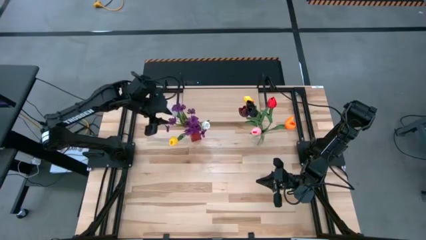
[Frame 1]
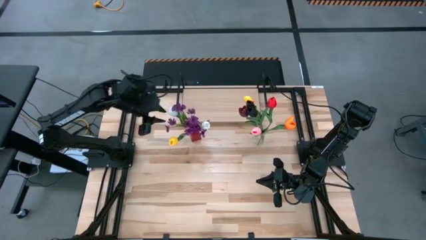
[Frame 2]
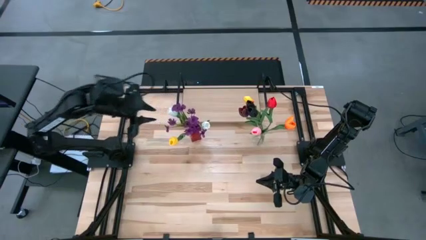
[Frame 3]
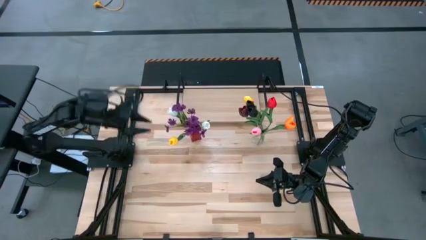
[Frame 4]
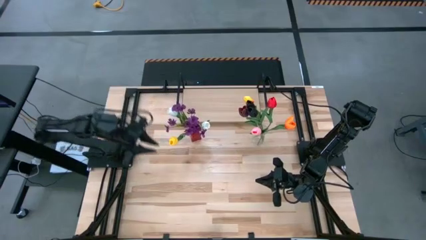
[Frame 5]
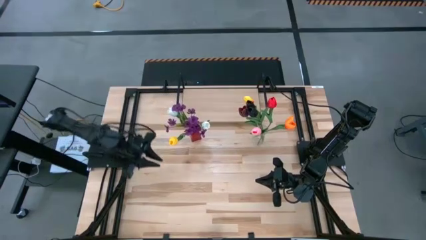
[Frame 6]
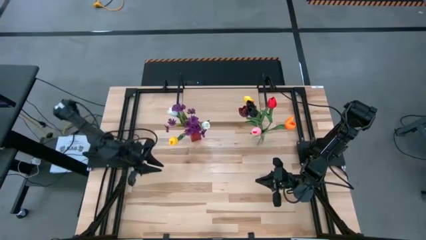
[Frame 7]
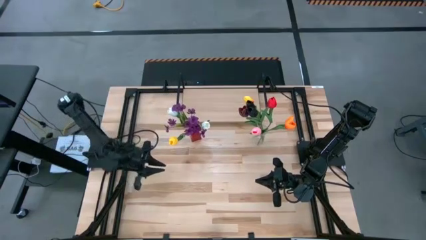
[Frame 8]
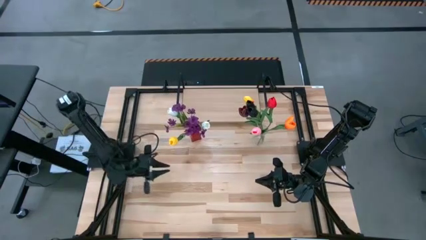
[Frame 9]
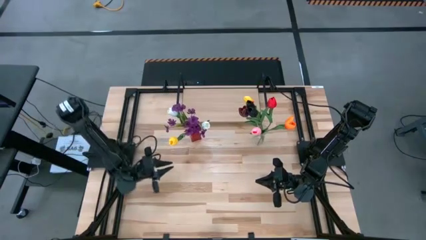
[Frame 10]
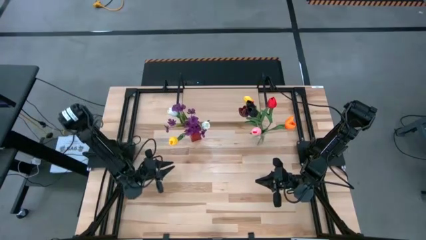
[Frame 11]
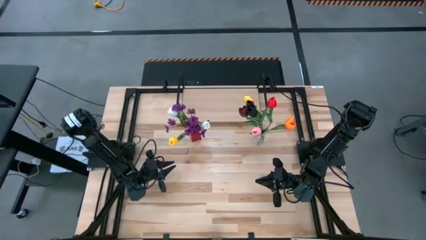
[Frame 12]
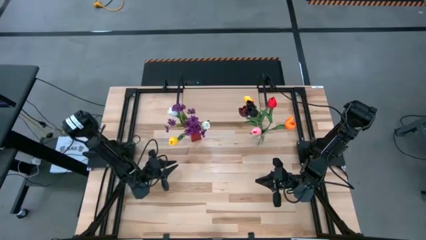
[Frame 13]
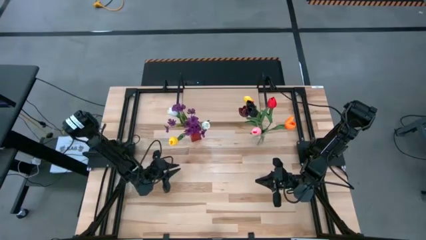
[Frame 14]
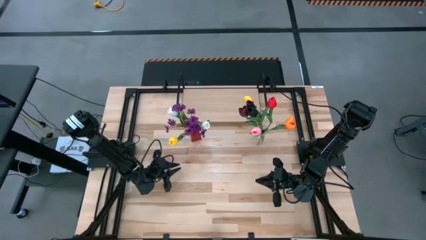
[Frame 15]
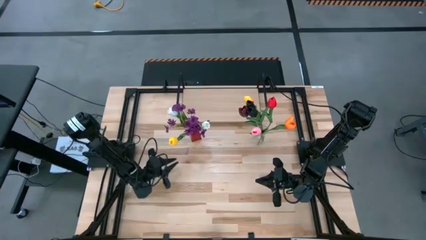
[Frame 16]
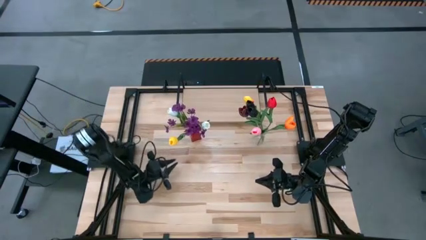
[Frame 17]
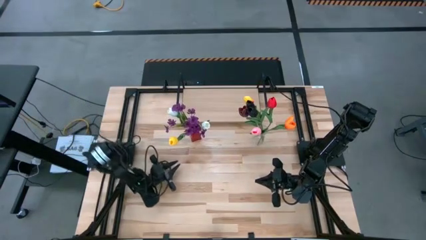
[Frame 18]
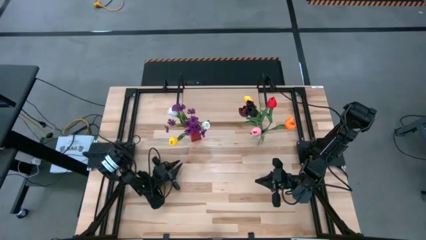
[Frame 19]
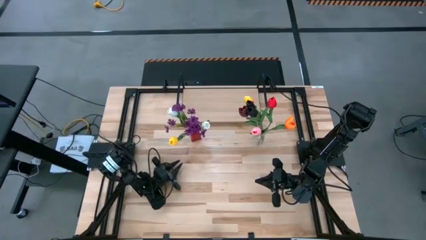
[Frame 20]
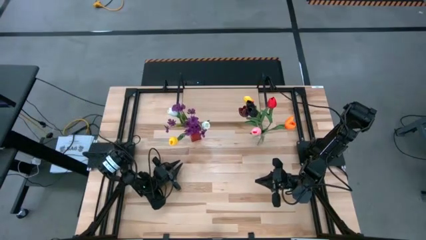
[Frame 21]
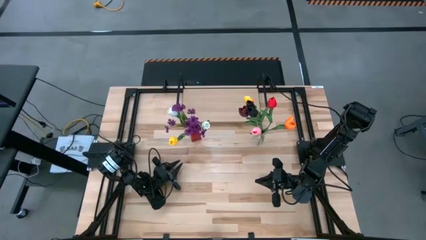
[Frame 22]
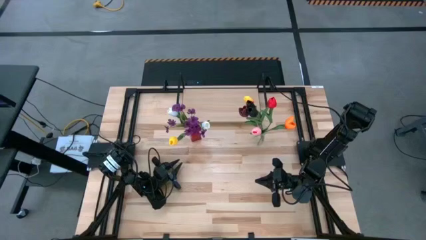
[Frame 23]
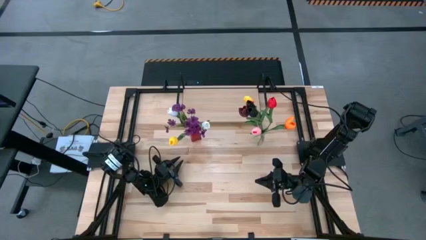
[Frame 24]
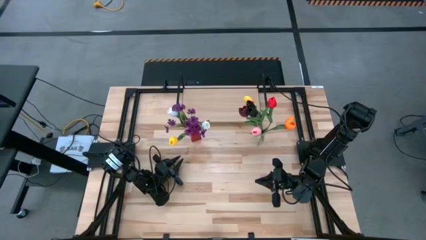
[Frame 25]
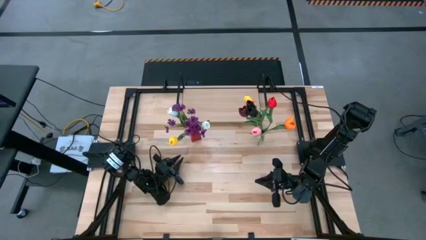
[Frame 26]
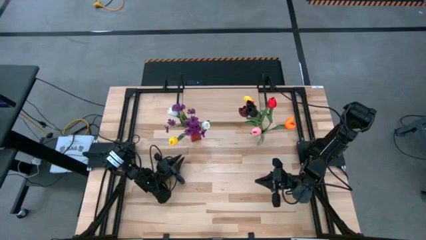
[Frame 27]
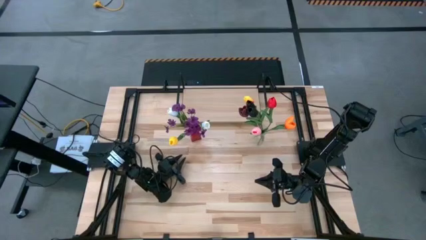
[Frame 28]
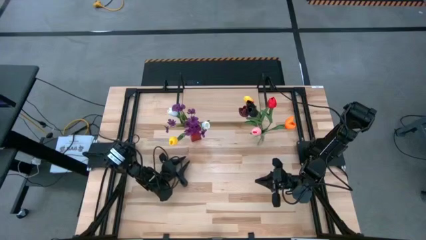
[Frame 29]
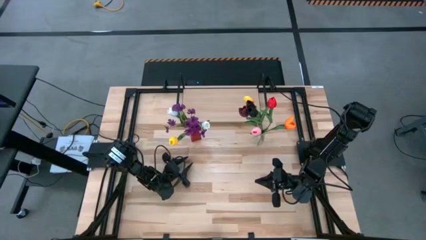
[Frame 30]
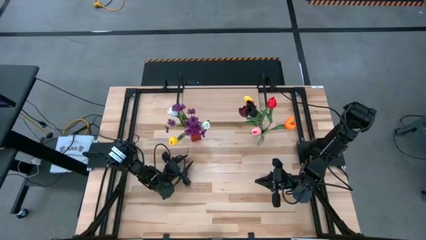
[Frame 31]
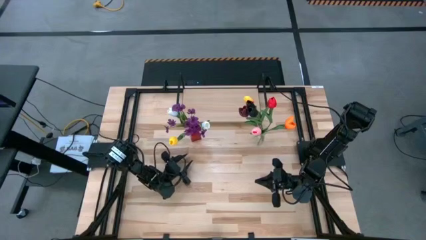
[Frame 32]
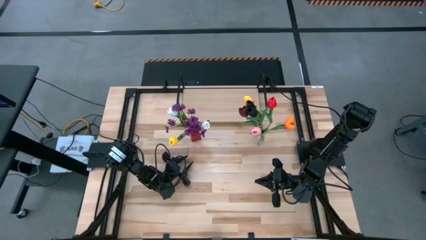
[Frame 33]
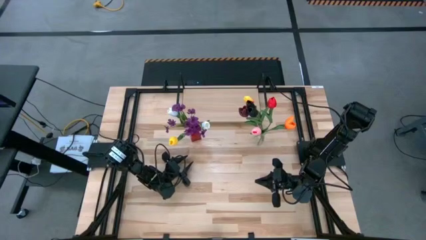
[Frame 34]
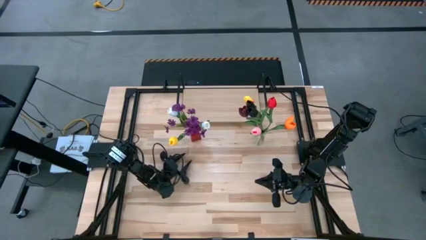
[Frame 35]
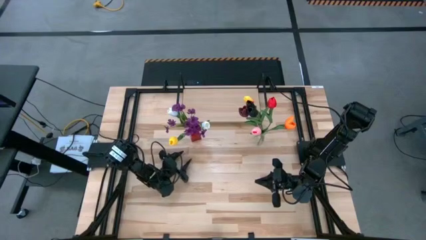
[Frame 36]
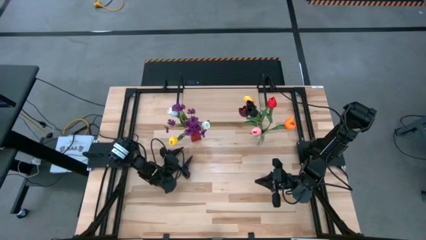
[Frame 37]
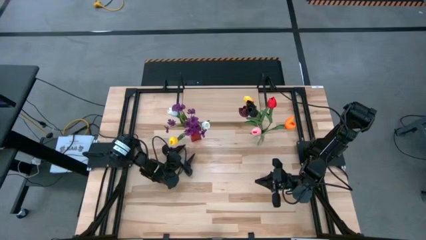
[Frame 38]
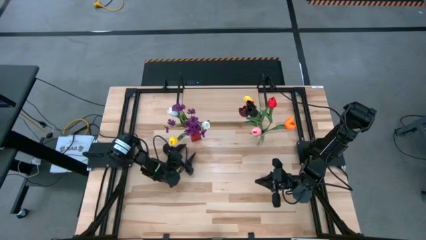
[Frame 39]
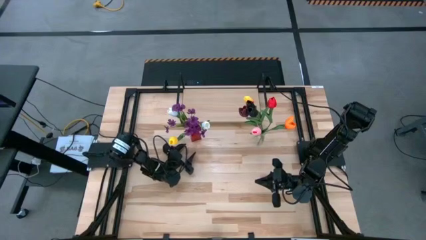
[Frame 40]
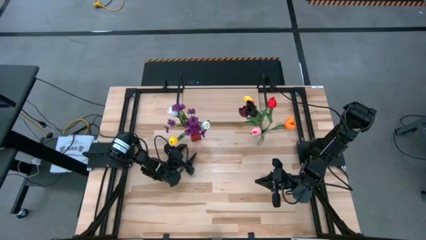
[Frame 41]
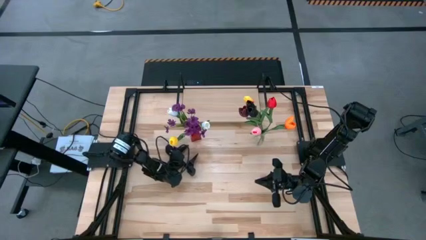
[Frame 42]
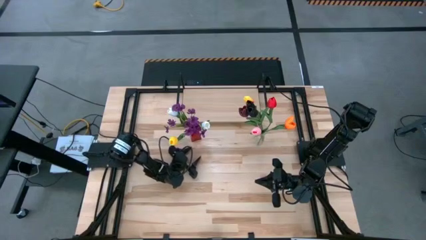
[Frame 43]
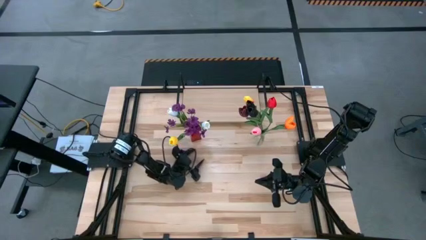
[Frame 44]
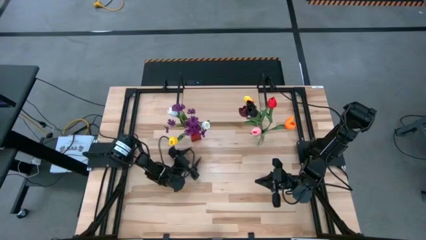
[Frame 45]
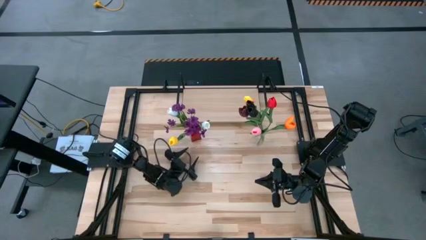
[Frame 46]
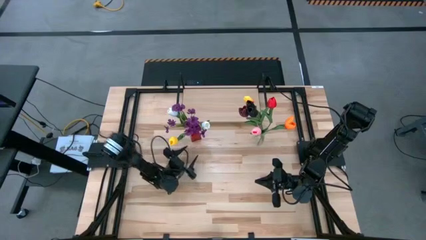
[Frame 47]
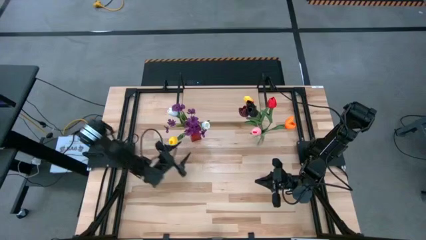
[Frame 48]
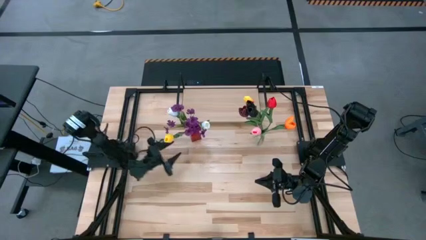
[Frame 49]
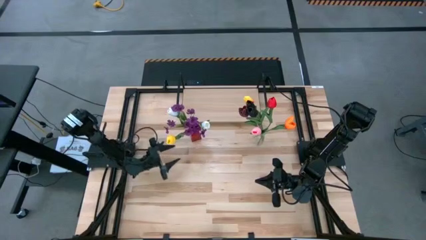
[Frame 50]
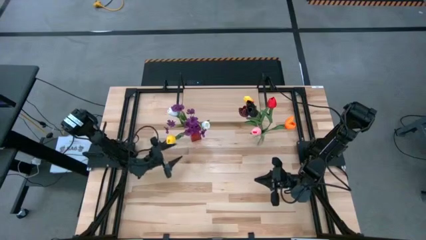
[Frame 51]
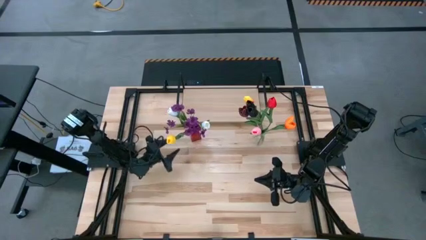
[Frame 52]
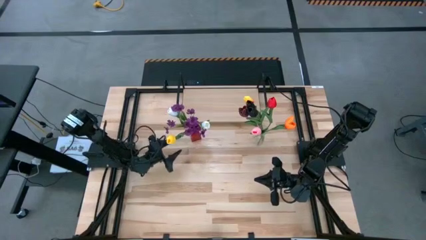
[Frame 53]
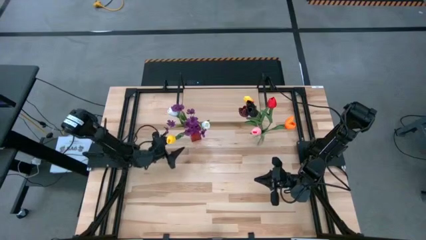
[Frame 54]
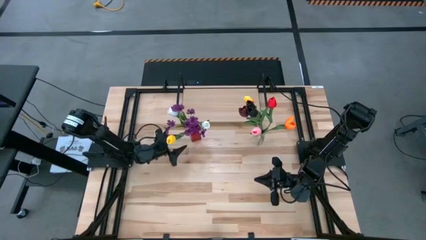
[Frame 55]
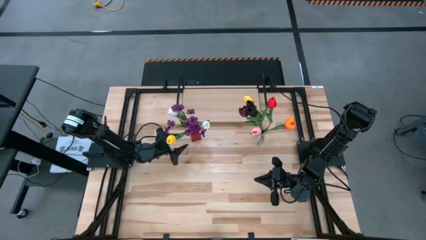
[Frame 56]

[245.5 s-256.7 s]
Task: Pick and place flowers into a vace then onto a shelf
Put the red vase on the shelf

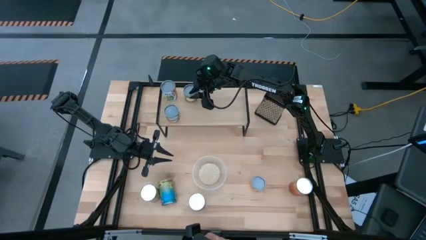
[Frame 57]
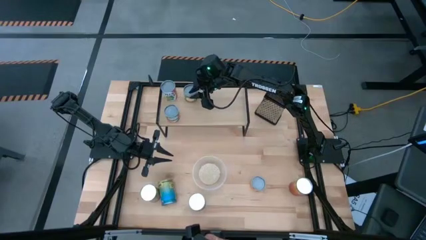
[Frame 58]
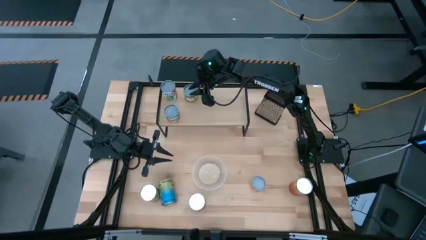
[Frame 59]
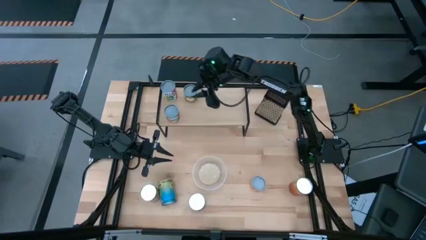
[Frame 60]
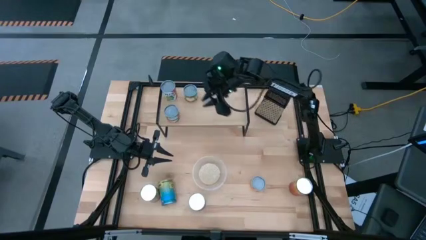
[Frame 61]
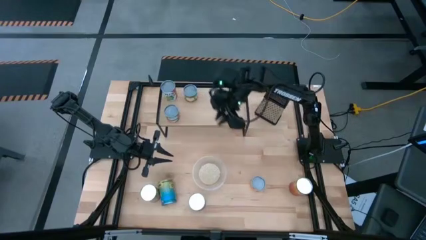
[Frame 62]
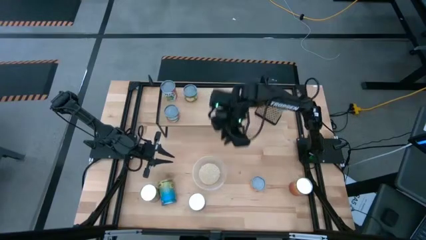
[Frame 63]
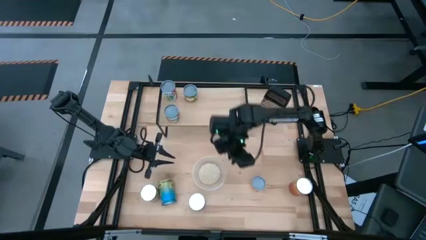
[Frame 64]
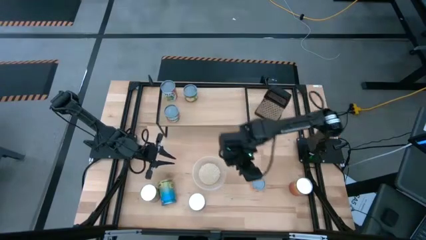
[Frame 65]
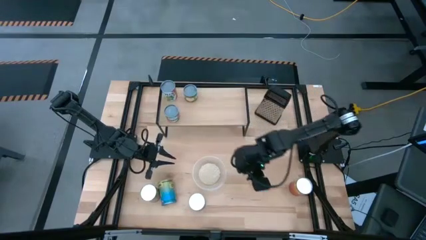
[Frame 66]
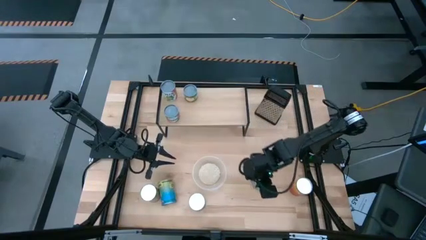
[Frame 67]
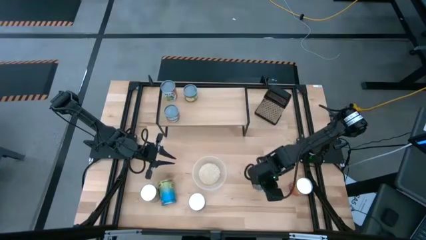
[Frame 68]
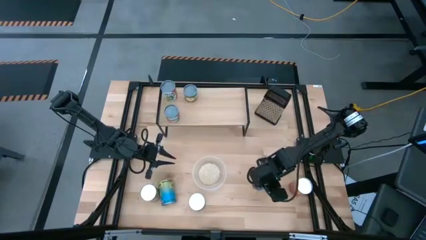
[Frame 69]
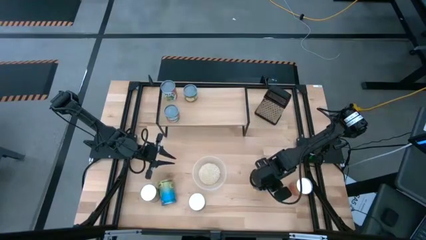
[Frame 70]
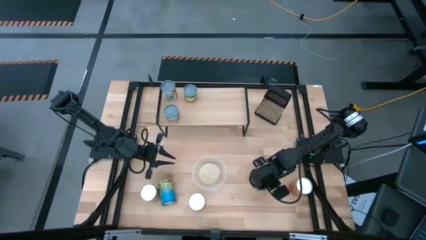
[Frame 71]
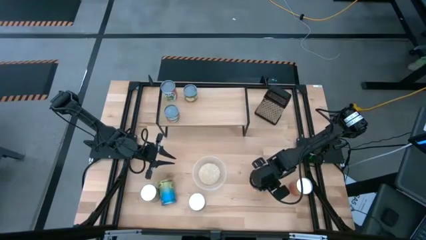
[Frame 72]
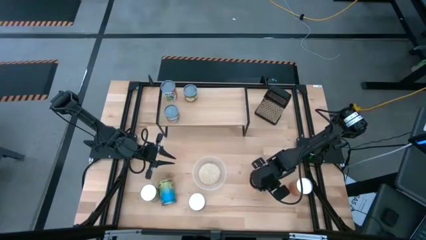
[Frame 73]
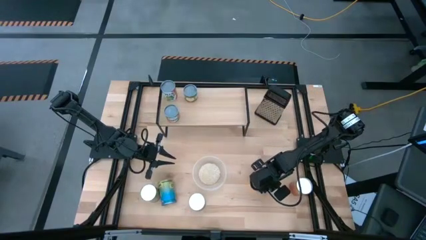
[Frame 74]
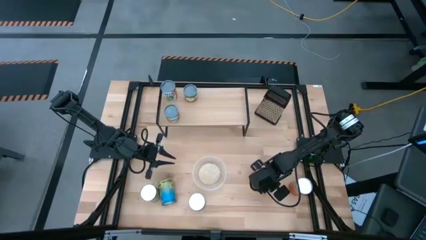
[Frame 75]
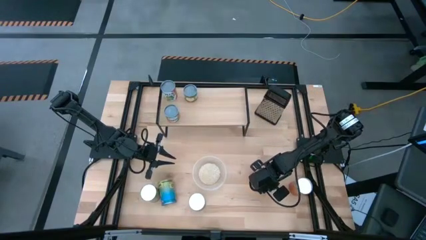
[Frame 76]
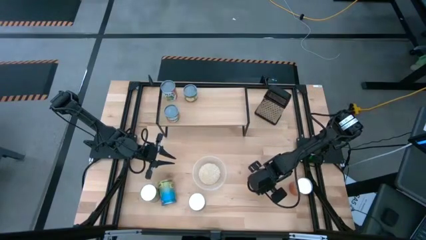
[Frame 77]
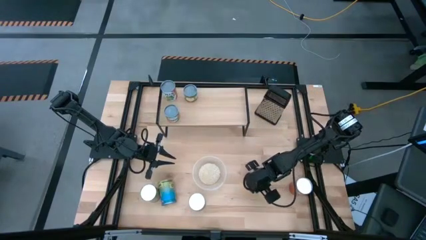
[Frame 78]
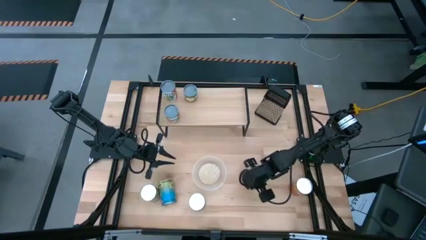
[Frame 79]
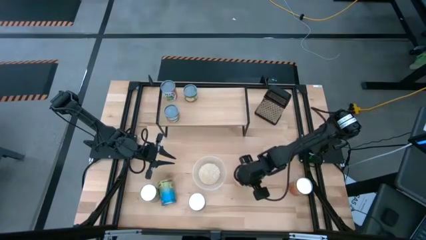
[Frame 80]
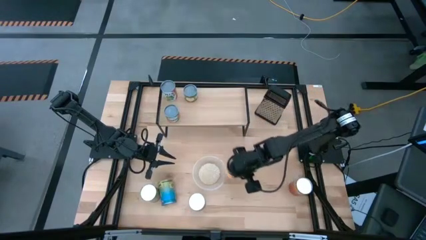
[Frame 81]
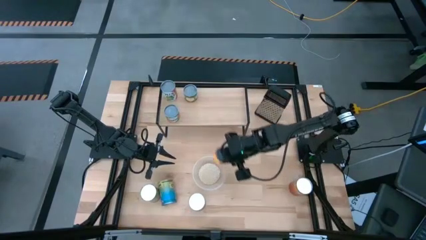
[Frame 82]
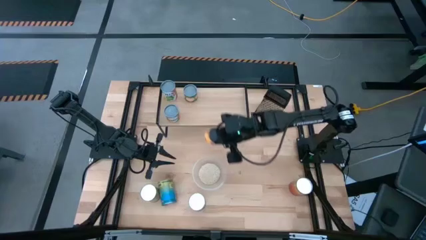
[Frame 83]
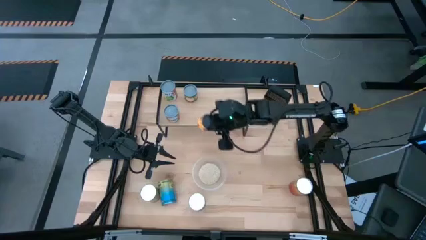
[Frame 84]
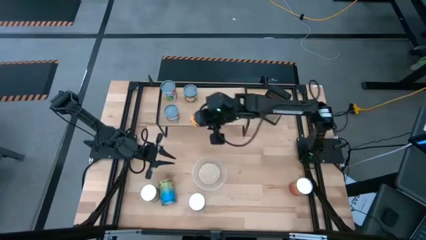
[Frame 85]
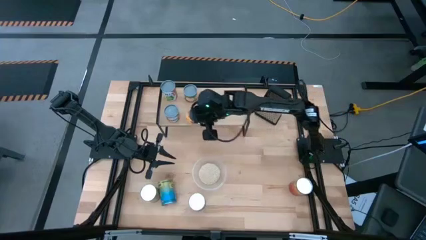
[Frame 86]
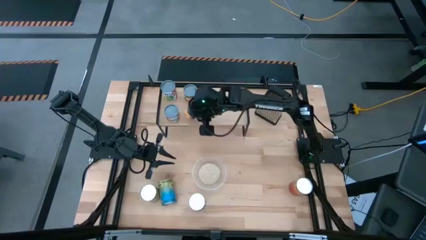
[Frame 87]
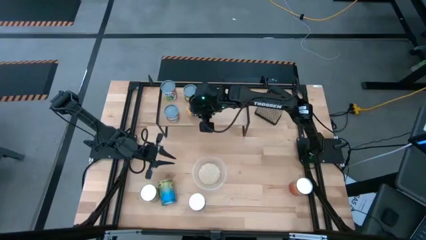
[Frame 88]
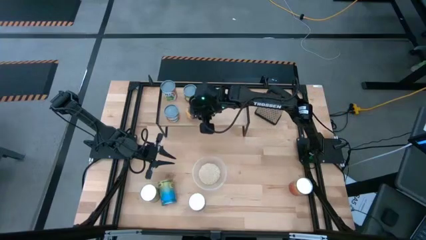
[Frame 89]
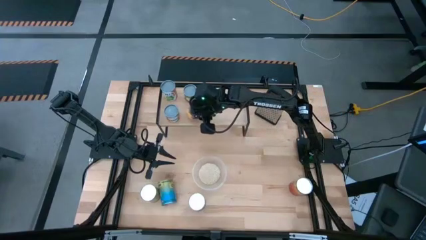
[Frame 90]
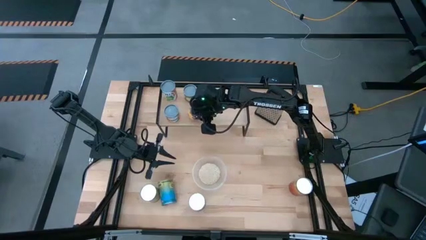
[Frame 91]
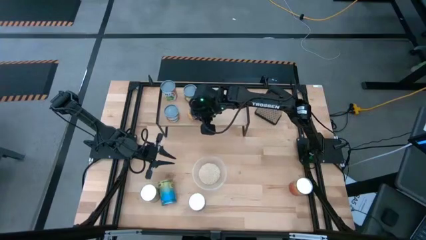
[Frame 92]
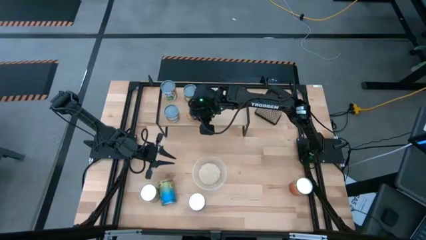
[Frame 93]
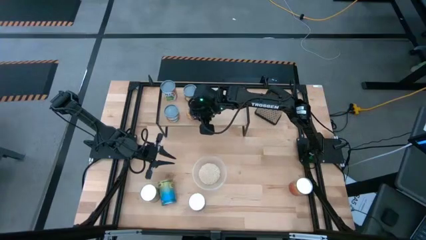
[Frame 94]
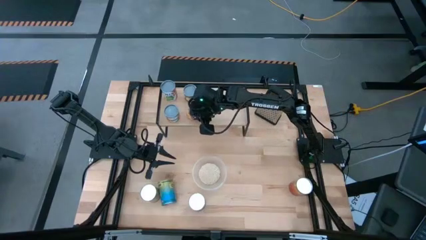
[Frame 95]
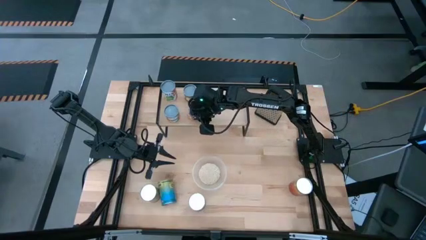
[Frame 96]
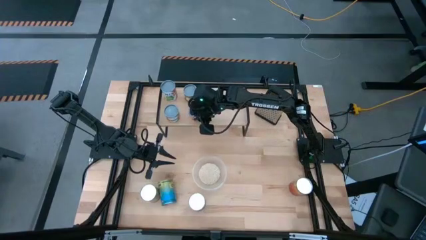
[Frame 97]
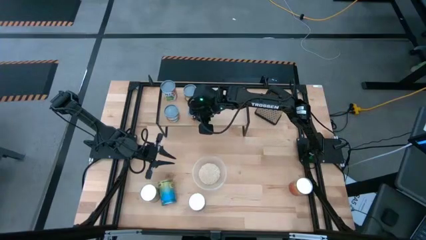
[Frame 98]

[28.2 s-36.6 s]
Task: Pick and place cans onto a shelf
Put the small canned pineapple on the shelf
